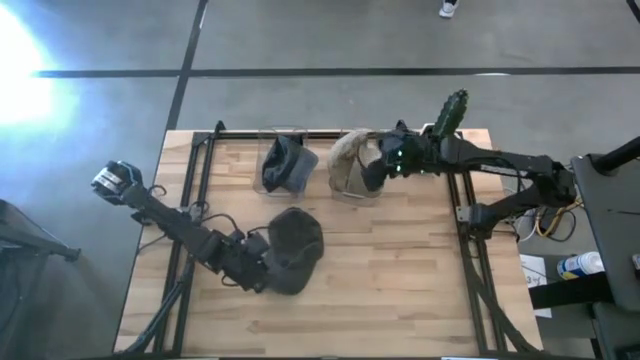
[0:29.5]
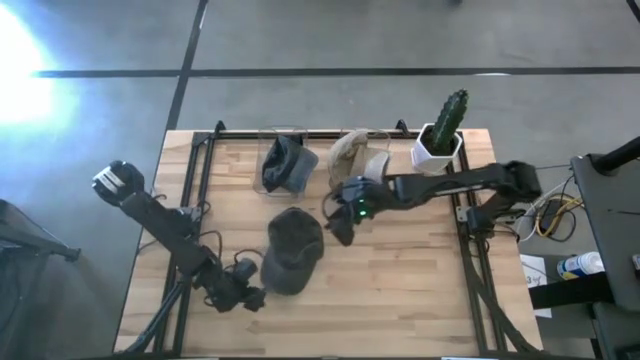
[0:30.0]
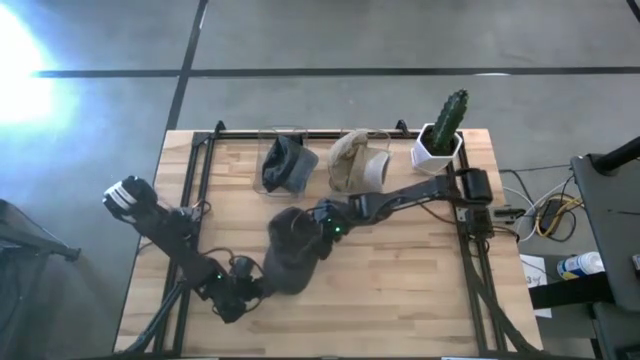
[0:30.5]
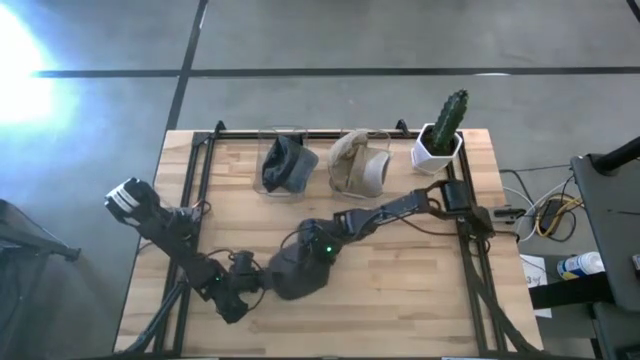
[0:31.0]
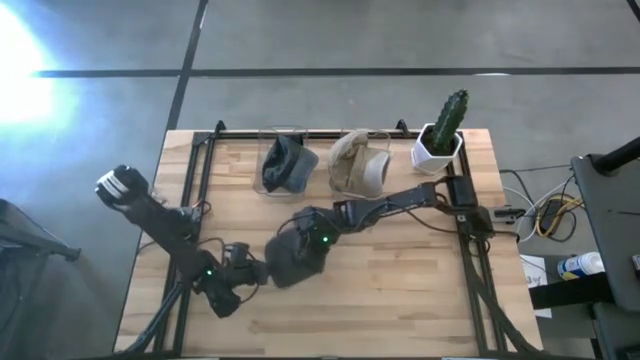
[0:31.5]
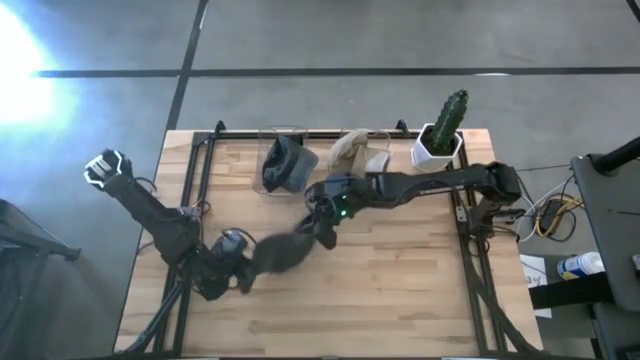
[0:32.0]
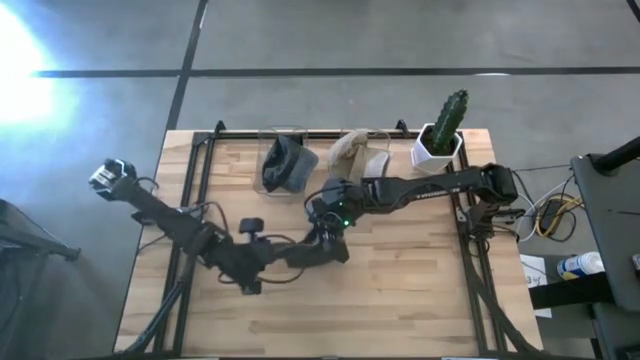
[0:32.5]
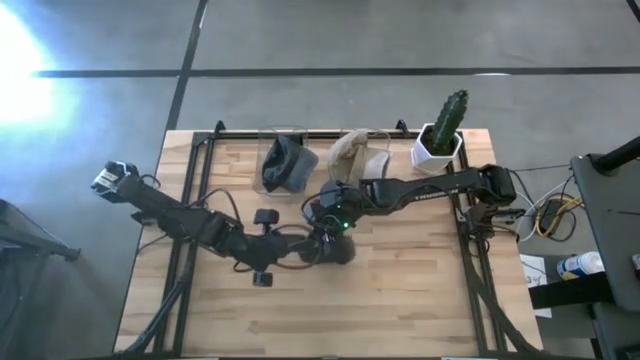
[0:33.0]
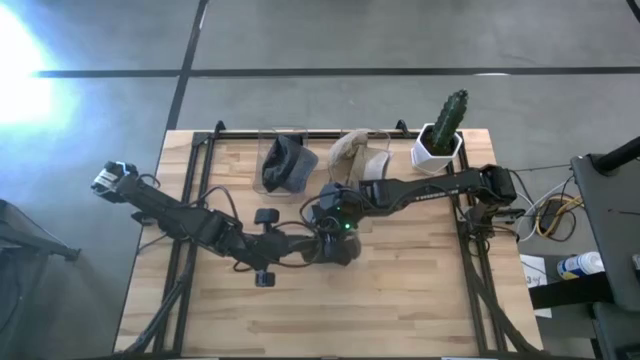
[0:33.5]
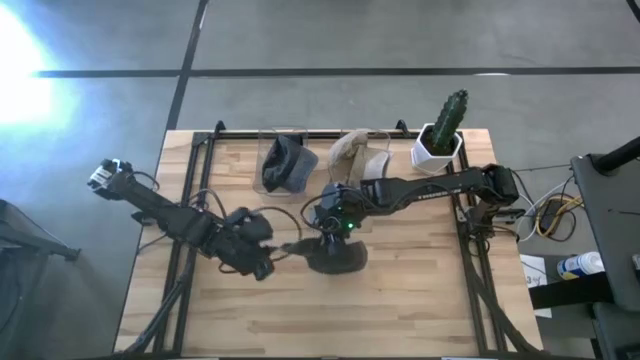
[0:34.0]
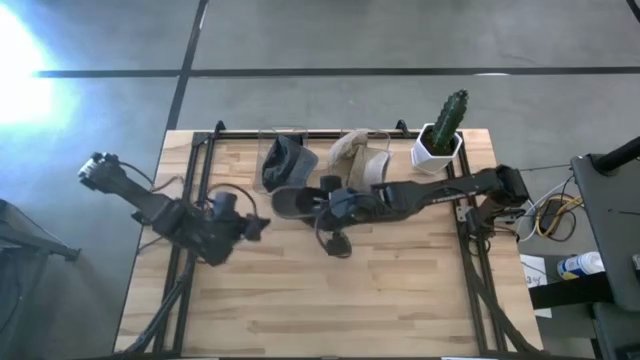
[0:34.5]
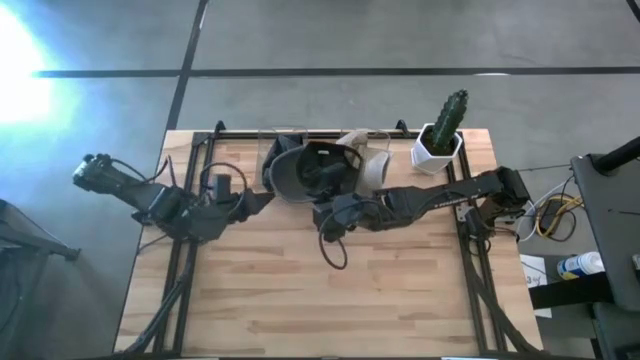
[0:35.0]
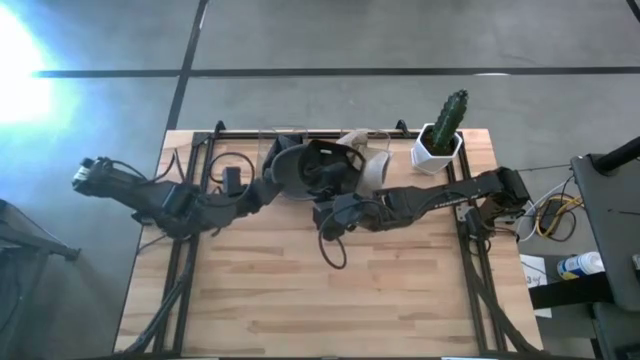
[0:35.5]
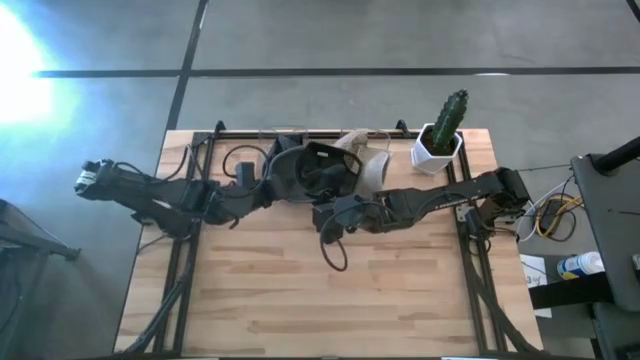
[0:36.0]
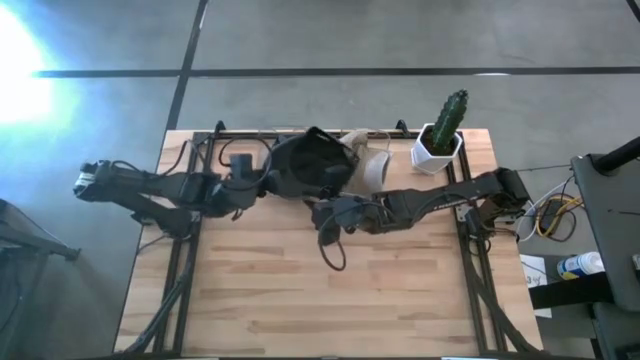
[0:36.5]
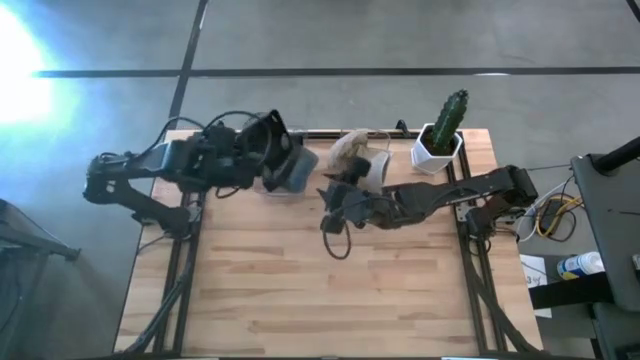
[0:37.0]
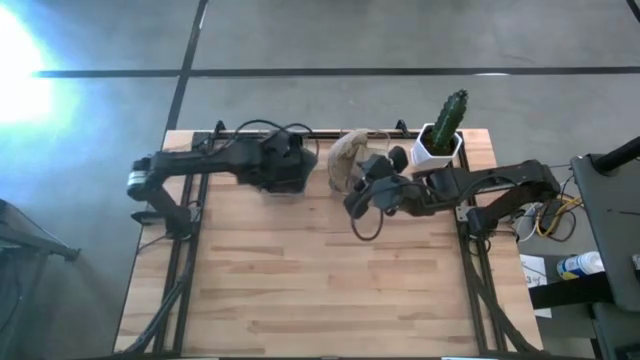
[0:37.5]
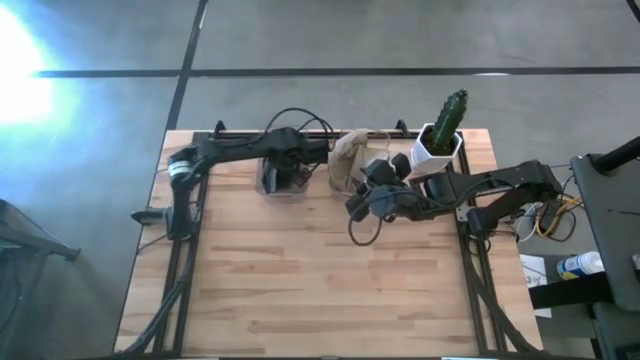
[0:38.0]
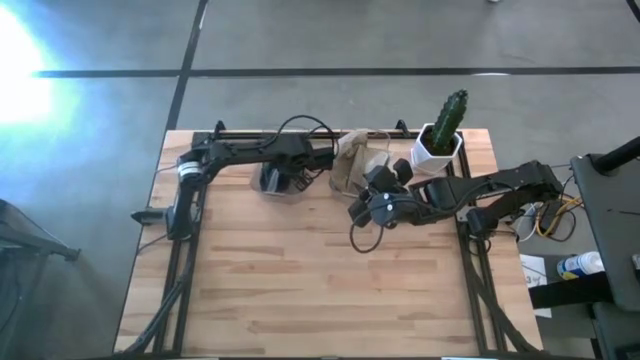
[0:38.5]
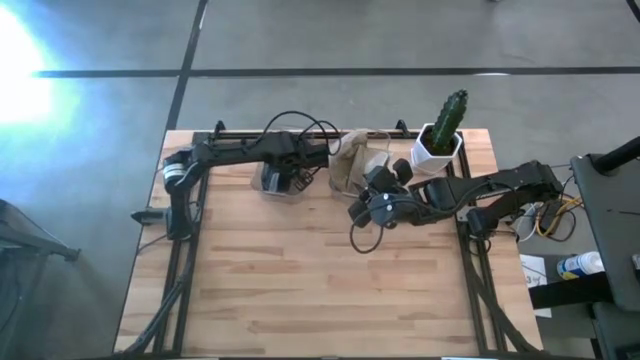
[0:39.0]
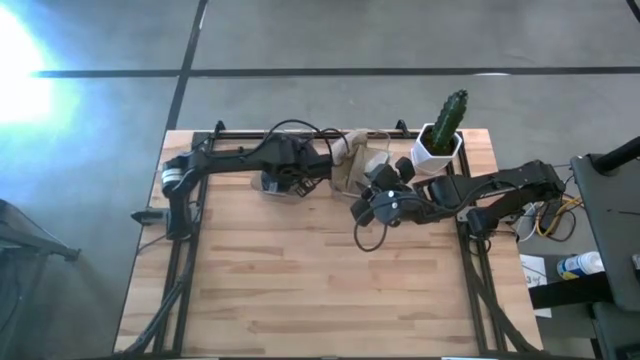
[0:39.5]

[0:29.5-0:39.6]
Task: Pick & Place hat
Put the black cap into the left transparent bin

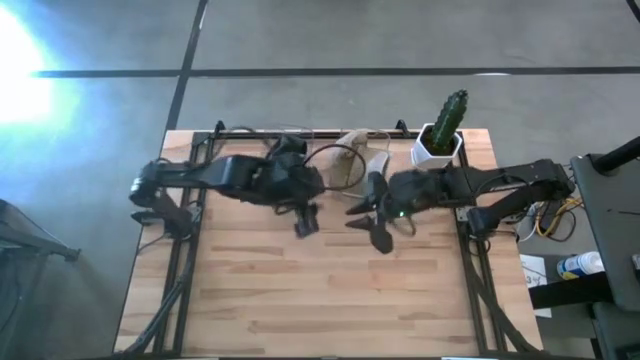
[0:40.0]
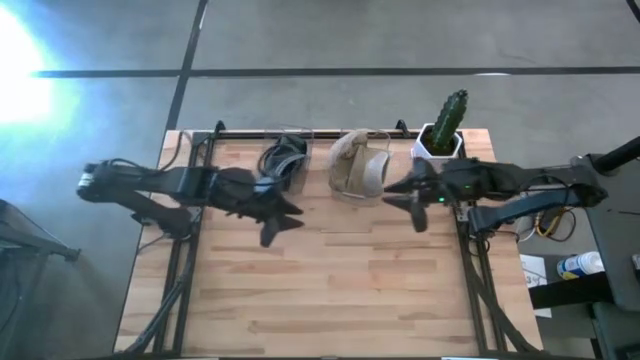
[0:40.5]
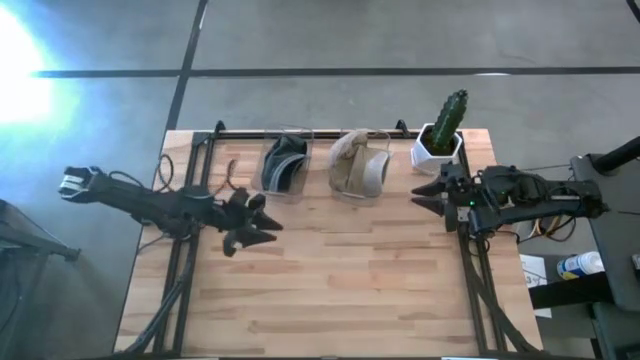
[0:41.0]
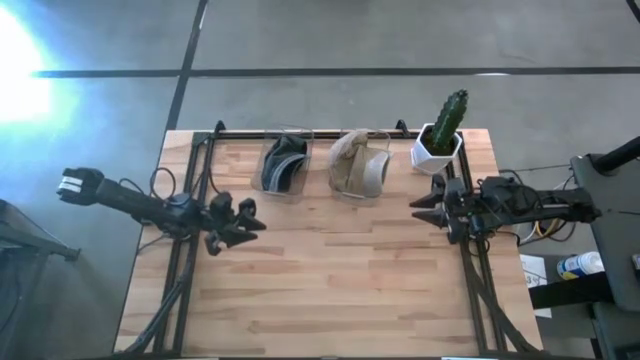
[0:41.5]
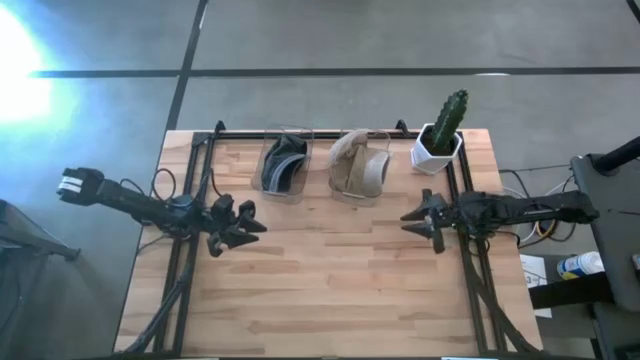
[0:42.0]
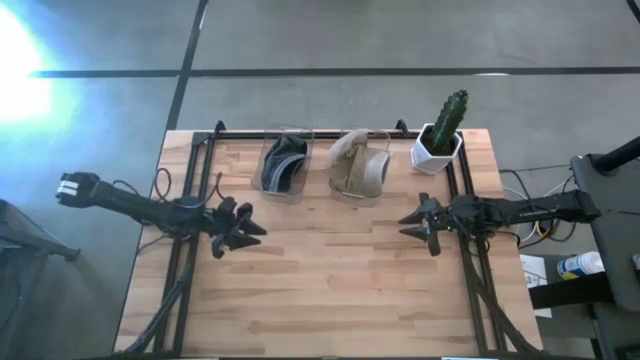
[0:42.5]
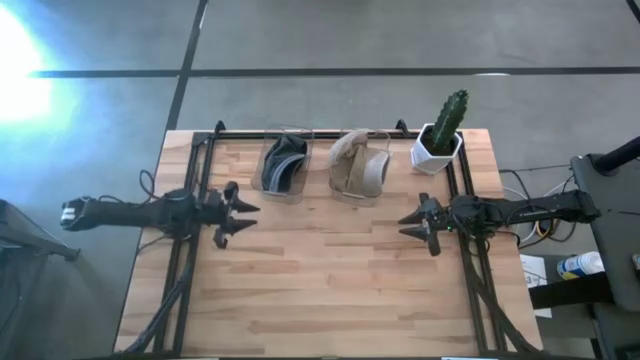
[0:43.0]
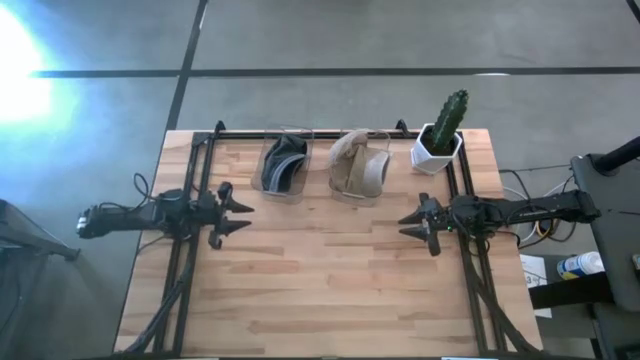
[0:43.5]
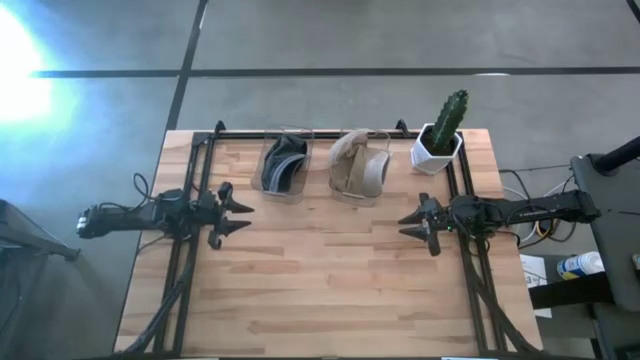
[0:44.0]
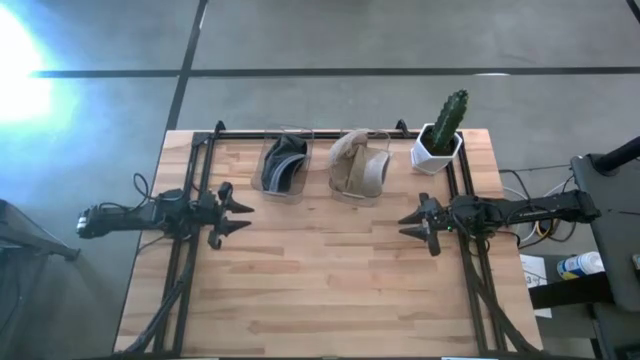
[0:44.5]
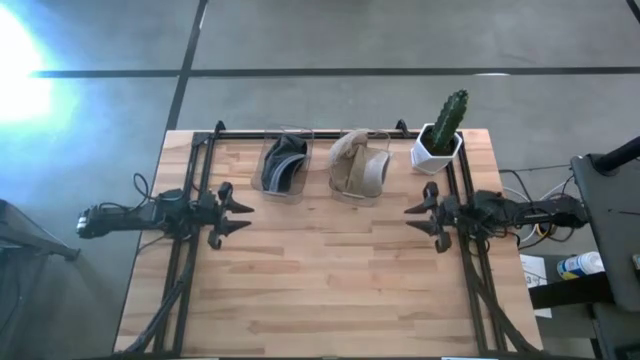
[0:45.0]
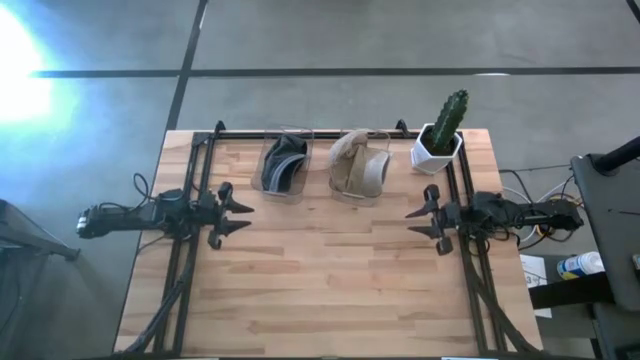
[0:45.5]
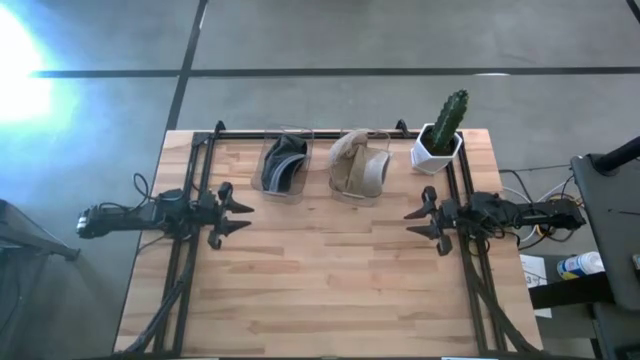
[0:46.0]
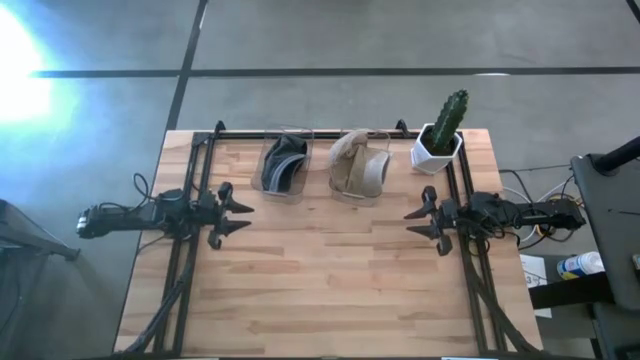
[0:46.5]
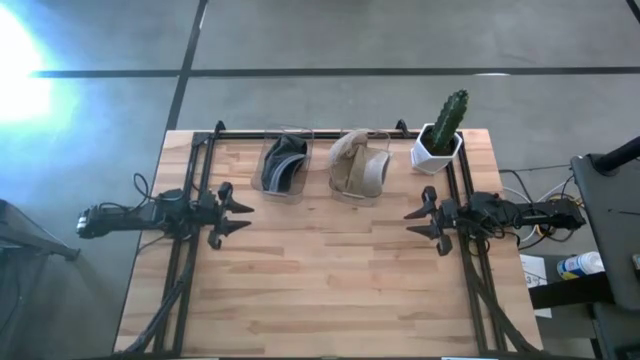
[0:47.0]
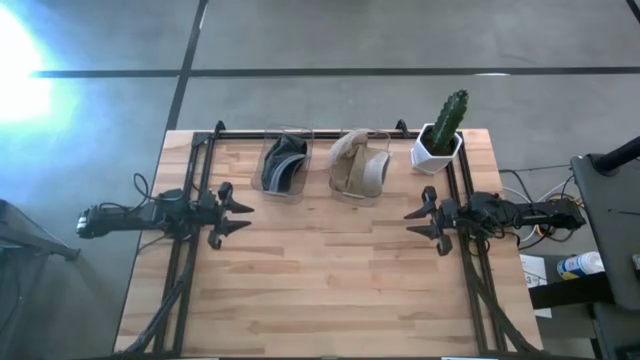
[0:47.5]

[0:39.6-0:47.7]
Return to Home Position
